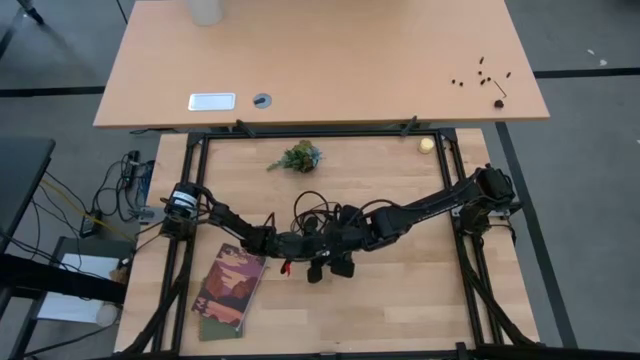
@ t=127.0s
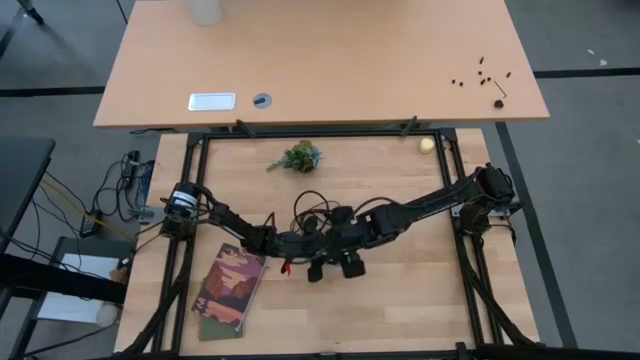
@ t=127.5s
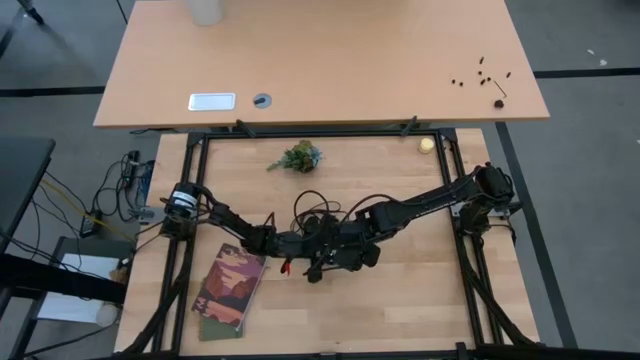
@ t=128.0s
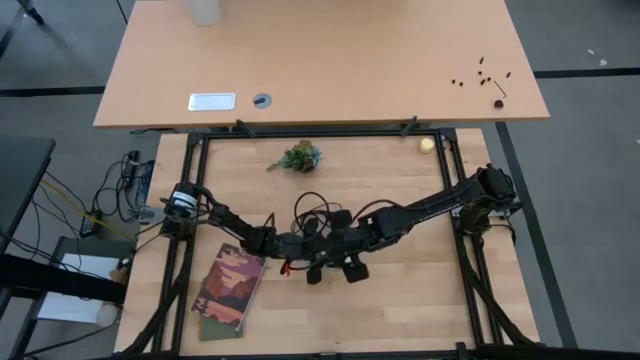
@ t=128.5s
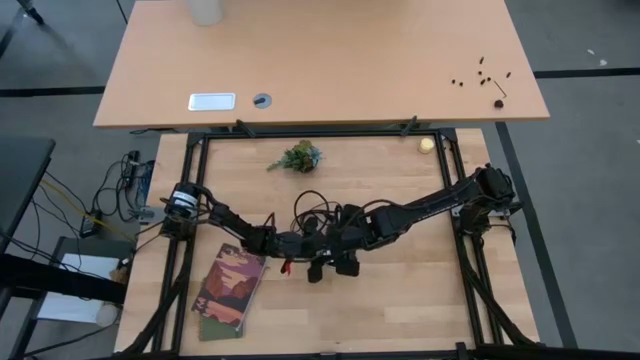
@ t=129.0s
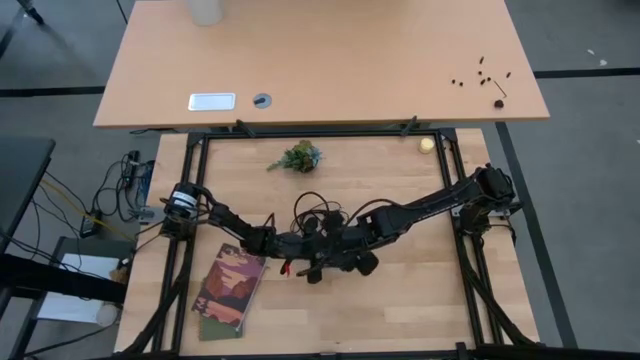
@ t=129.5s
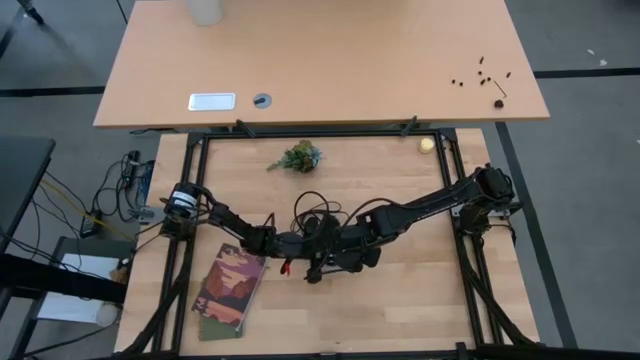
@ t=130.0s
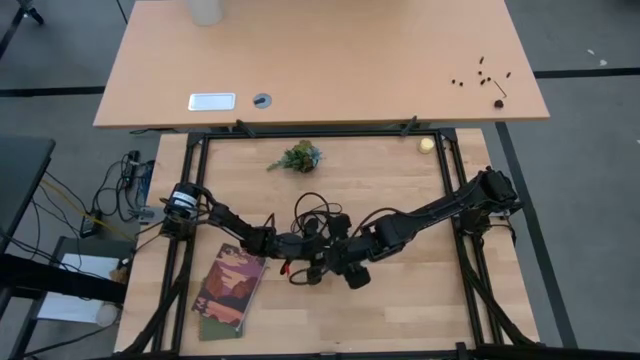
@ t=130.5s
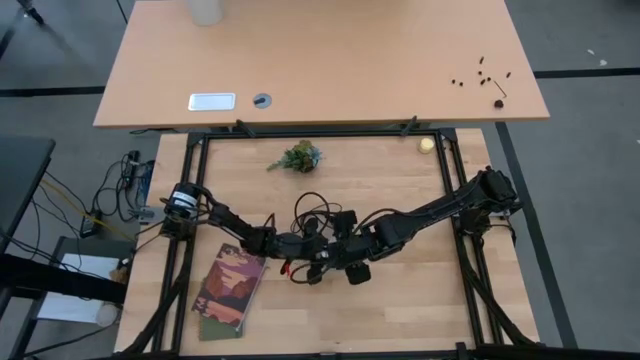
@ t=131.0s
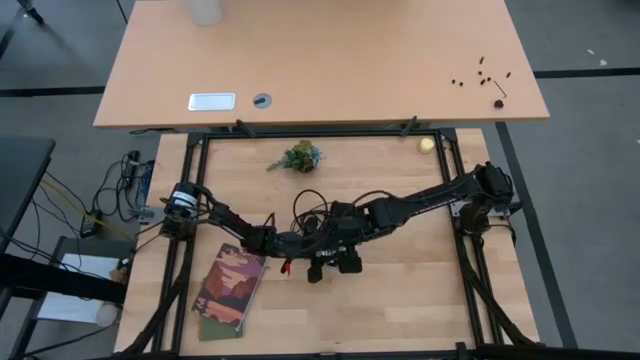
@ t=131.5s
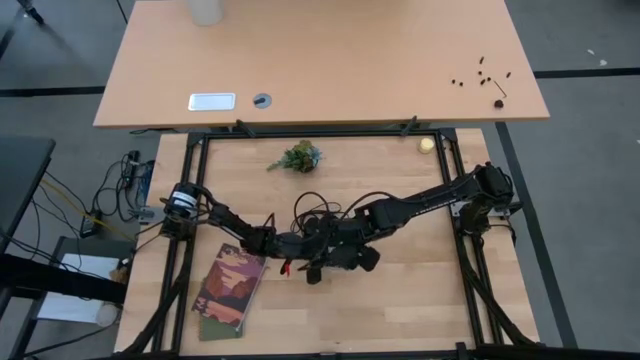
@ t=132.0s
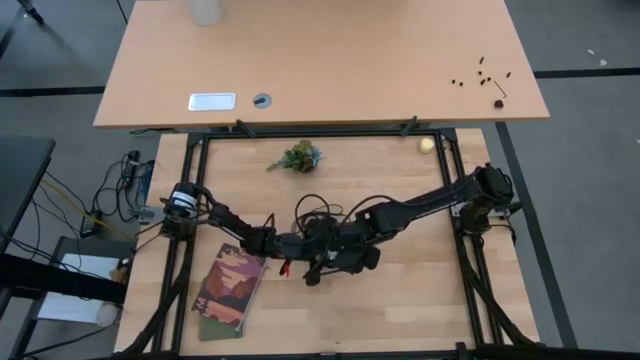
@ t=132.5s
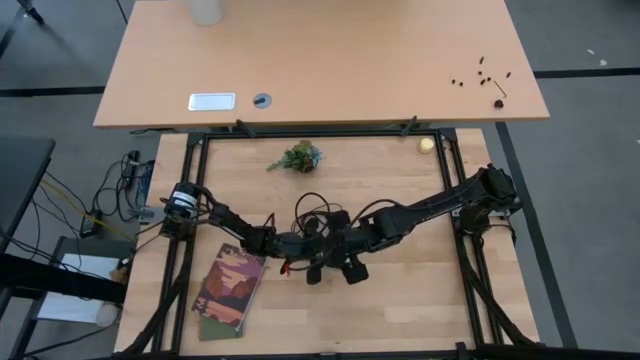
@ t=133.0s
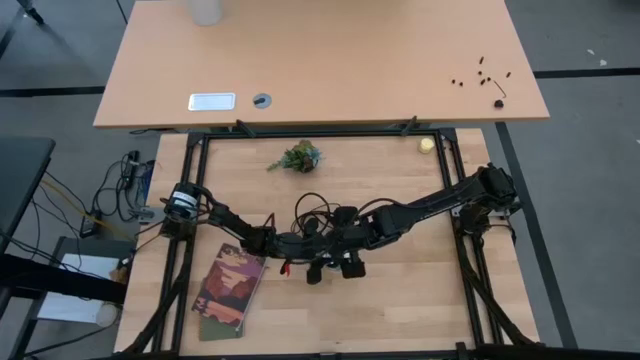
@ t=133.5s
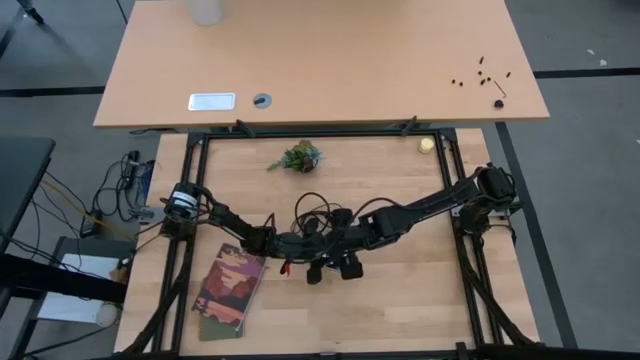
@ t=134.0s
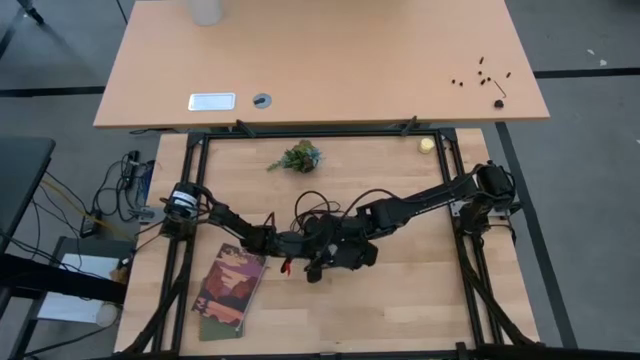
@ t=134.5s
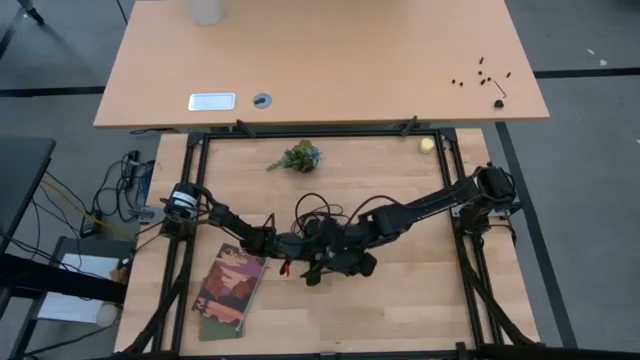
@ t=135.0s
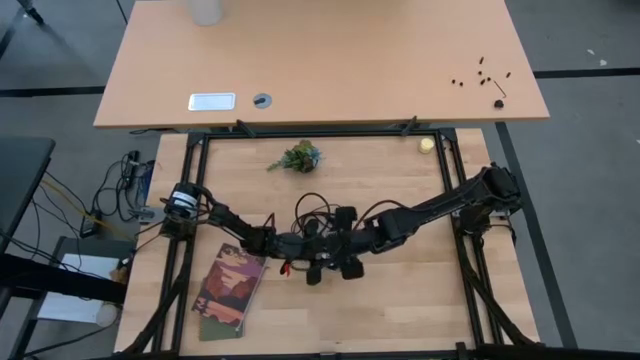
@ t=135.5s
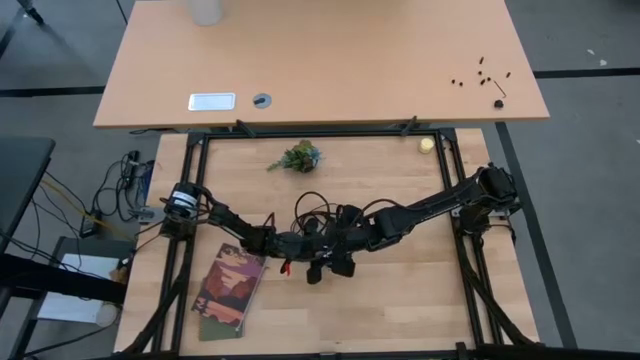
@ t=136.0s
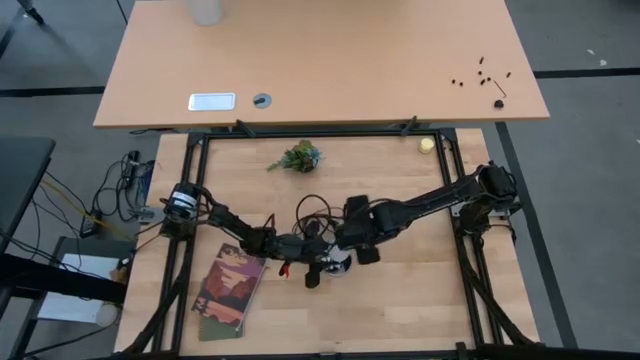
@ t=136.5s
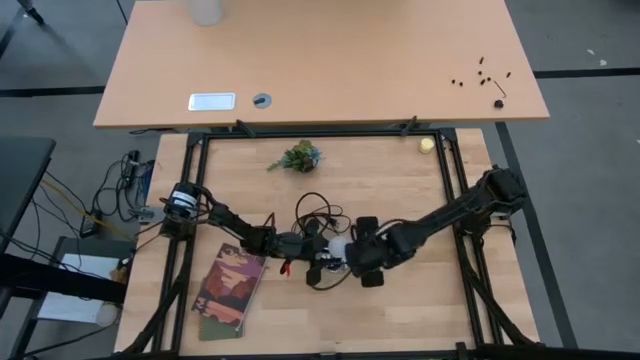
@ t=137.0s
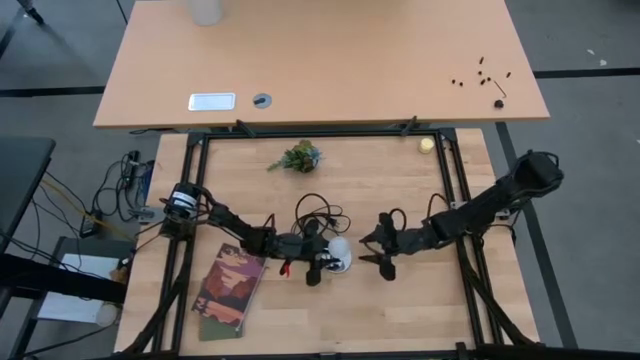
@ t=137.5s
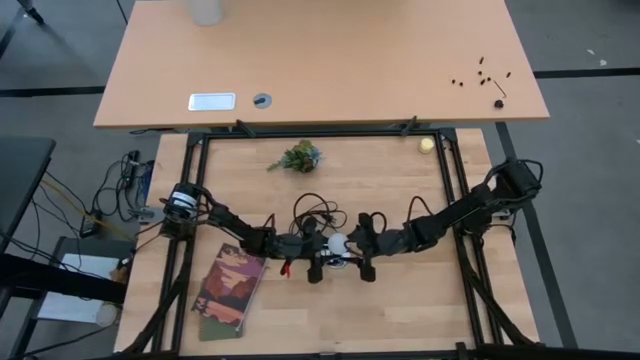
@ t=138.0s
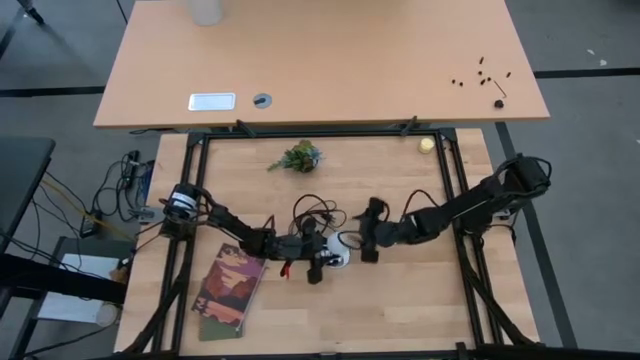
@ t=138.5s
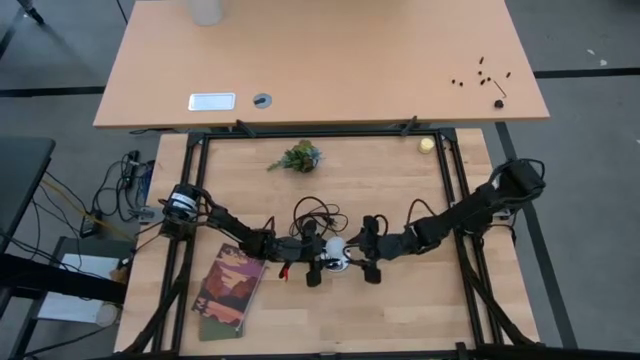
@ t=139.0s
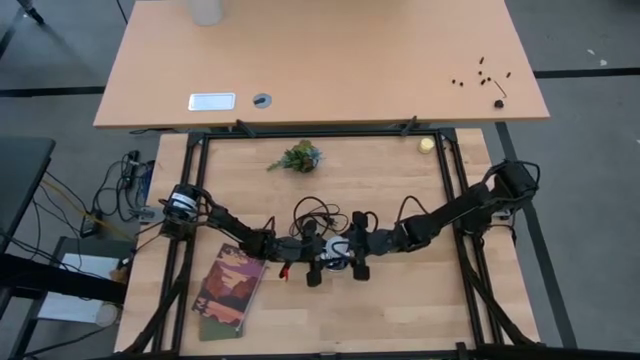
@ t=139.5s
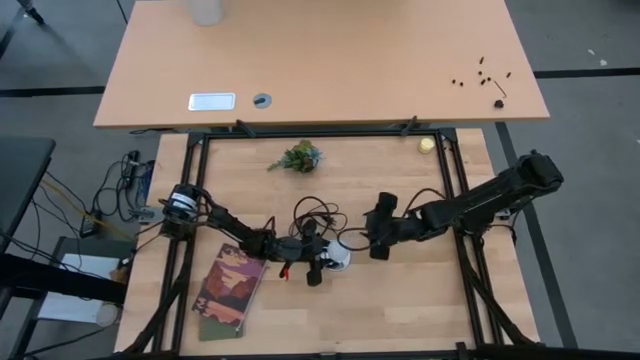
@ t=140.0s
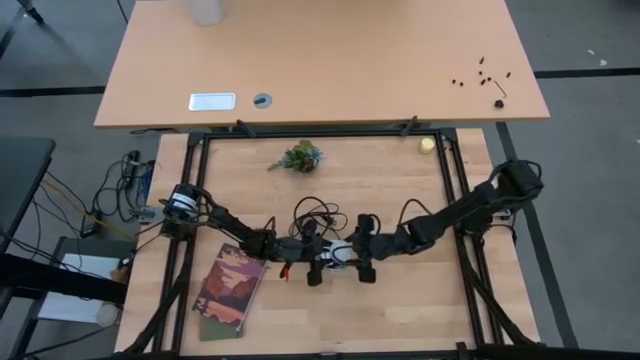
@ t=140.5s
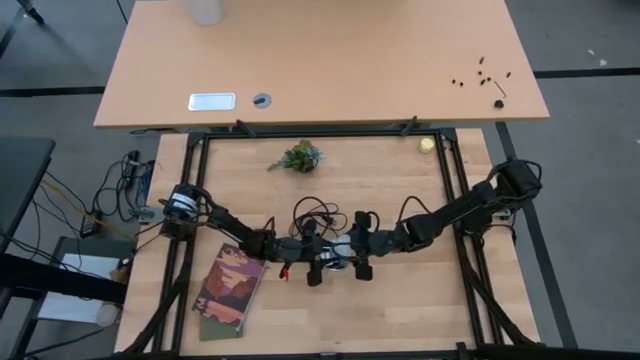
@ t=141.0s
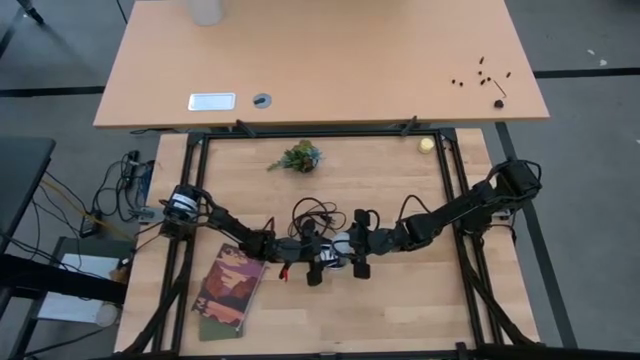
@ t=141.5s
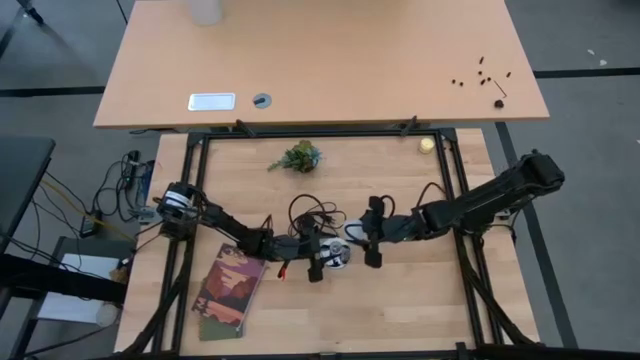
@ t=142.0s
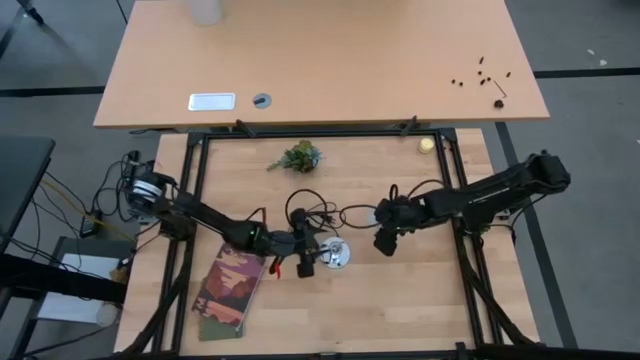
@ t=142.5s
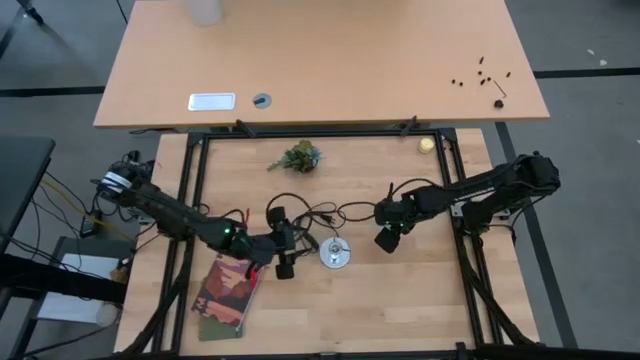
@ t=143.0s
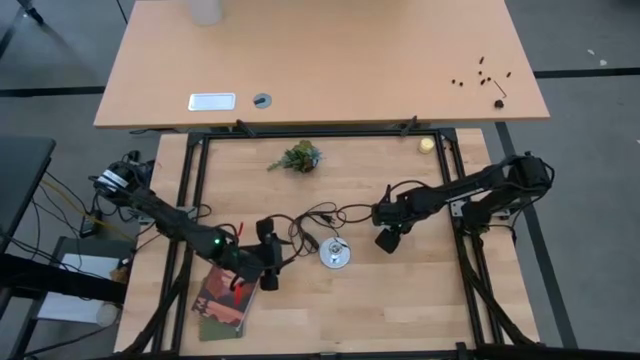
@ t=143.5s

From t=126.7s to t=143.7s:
Task: Screw lightbulb
Remove the white lightbulb from the lamp socket
